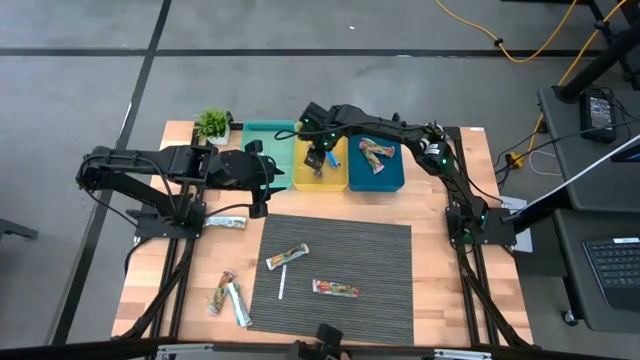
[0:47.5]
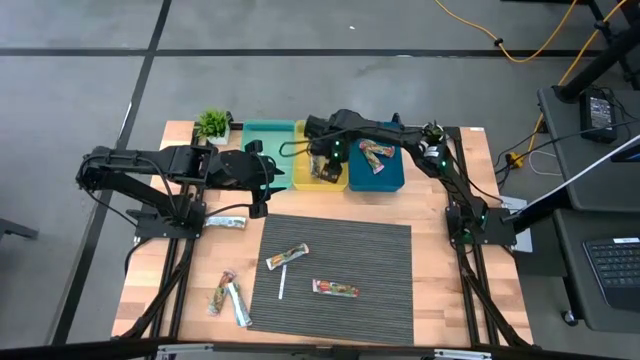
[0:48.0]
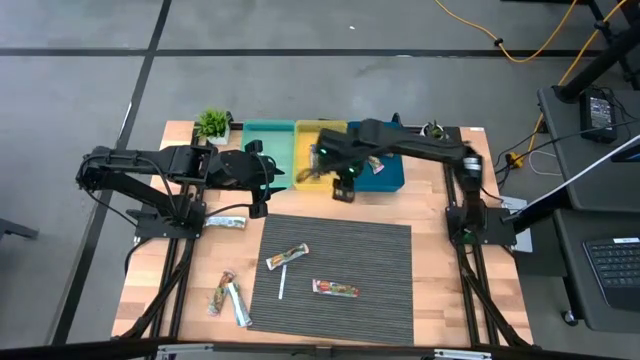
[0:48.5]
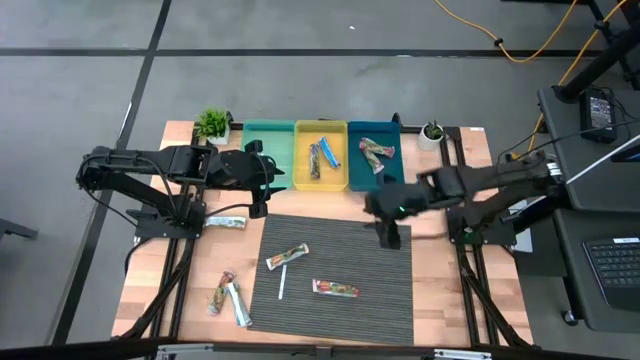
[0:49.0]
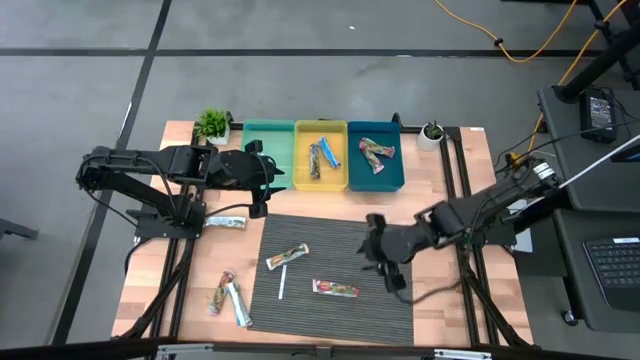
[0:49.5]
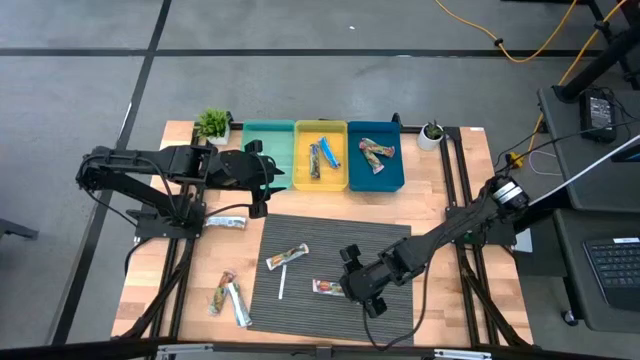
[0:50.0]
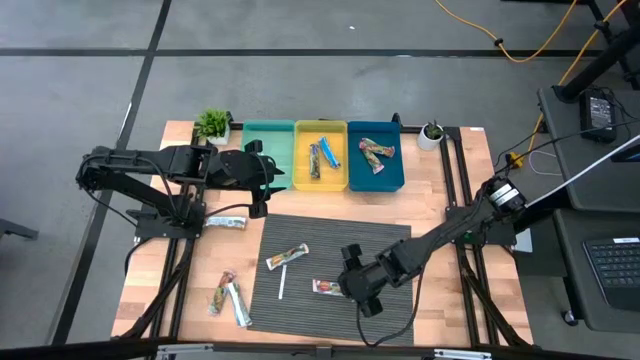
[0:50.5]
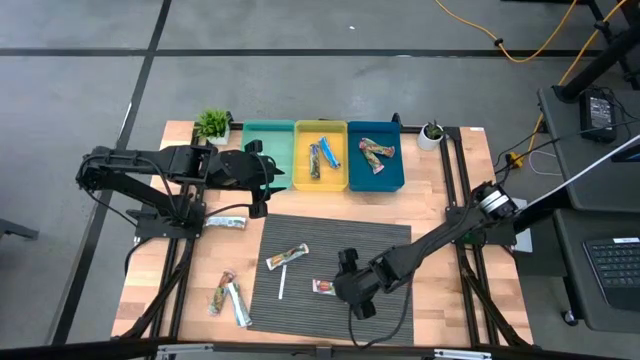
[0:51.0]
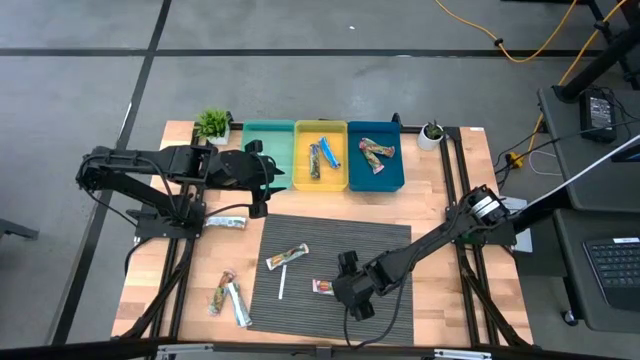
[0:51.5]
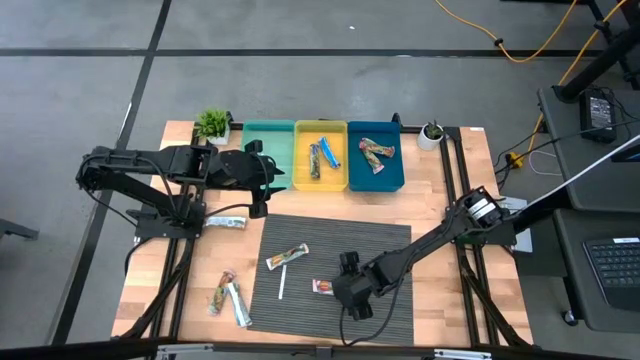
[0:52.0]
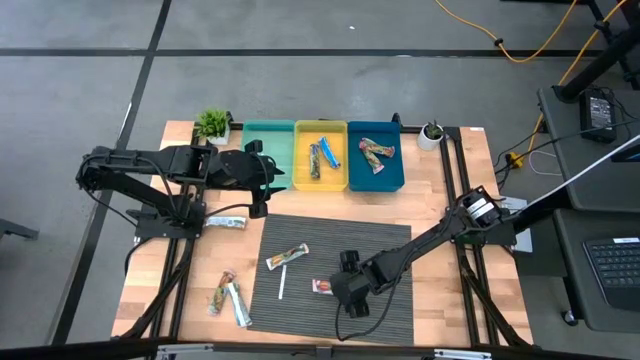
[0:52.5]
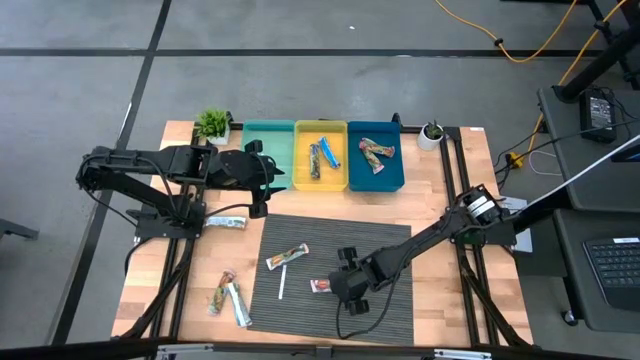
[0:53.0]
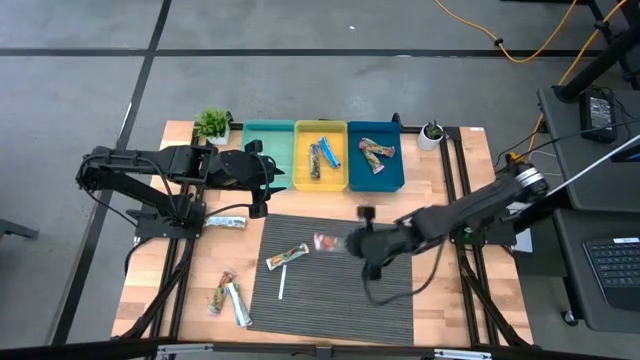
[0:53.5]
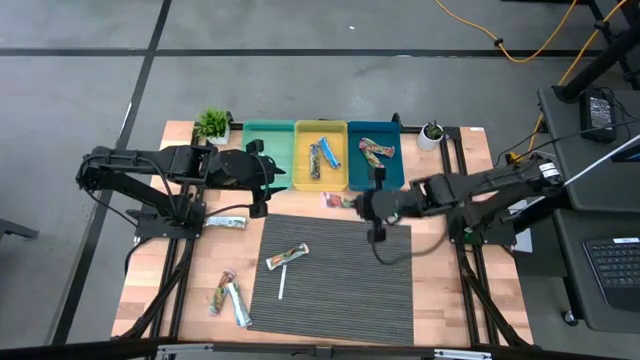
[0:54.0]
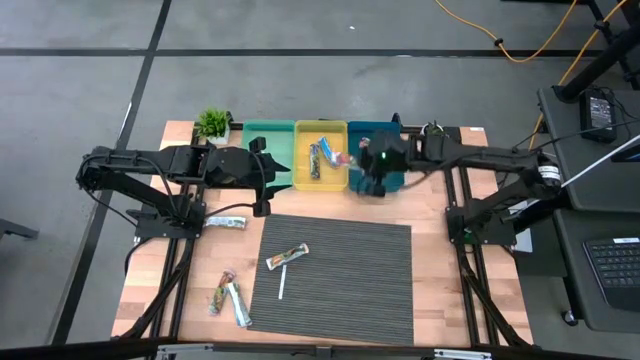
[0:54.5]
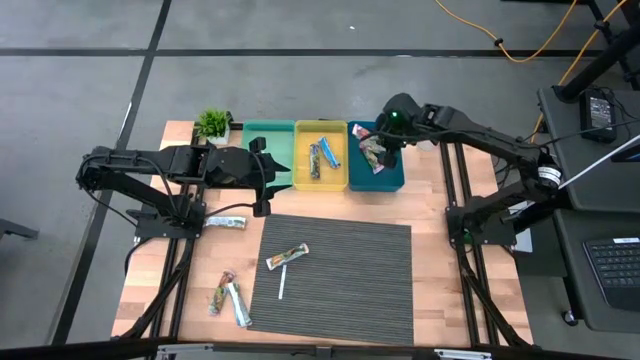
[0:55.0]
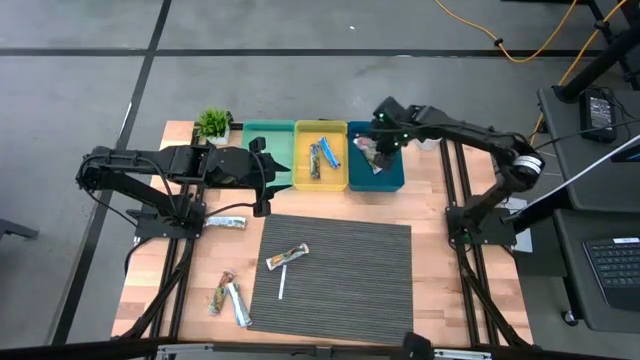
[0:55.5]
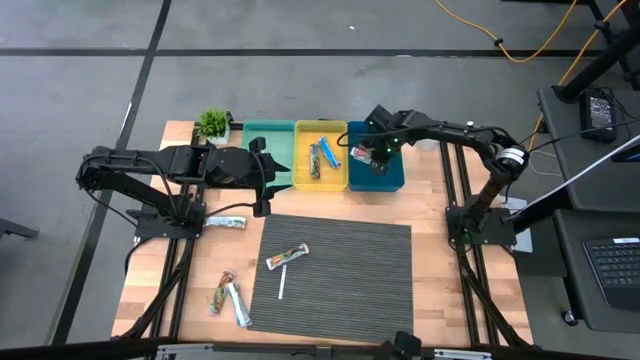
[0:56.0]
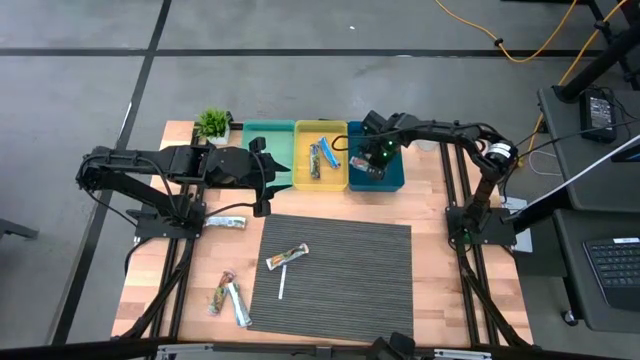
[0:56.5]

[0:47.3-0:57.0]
Task: Pick and place Granola Bars by type
Put the red granola bar into the blue bin

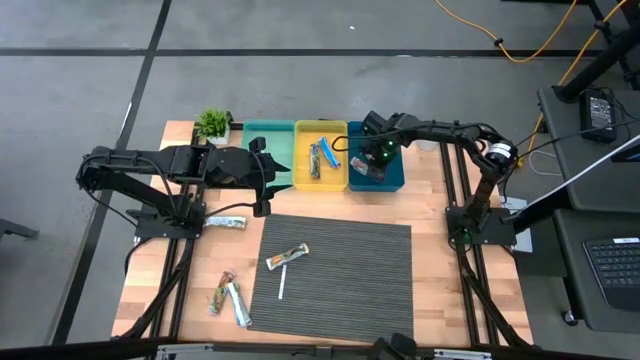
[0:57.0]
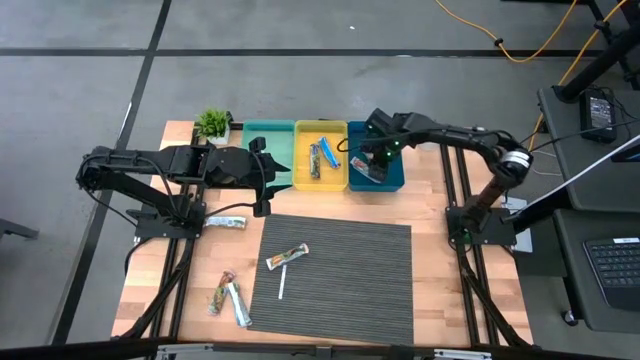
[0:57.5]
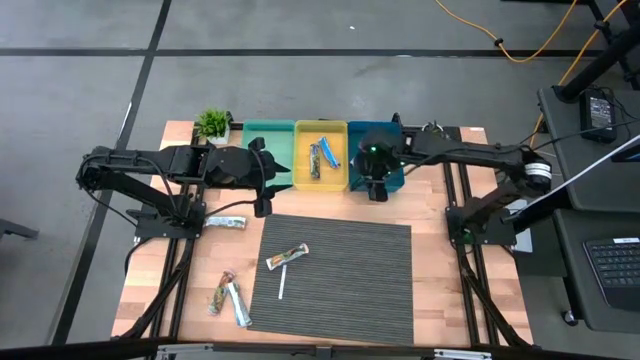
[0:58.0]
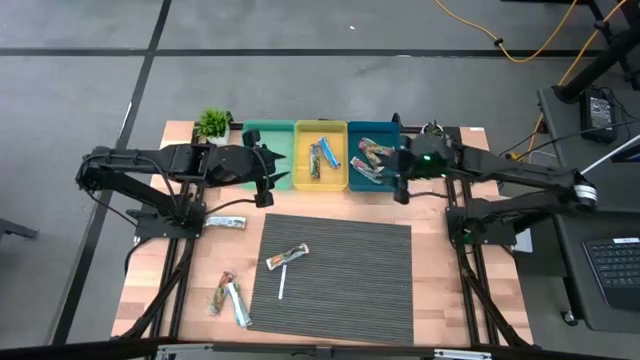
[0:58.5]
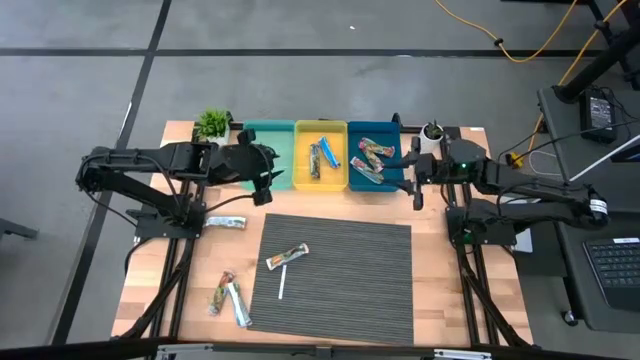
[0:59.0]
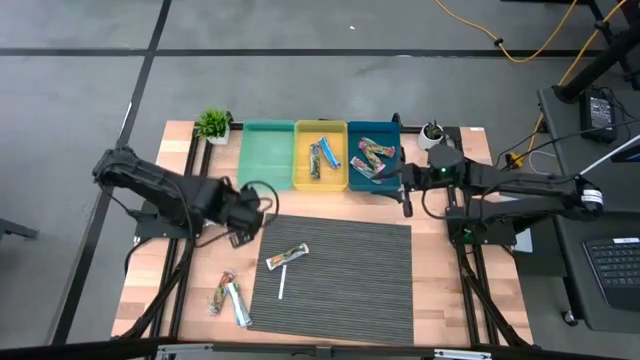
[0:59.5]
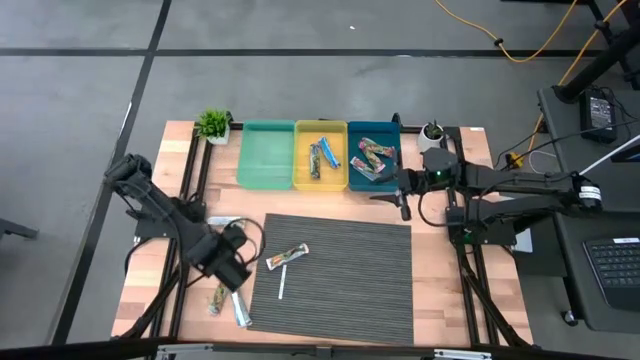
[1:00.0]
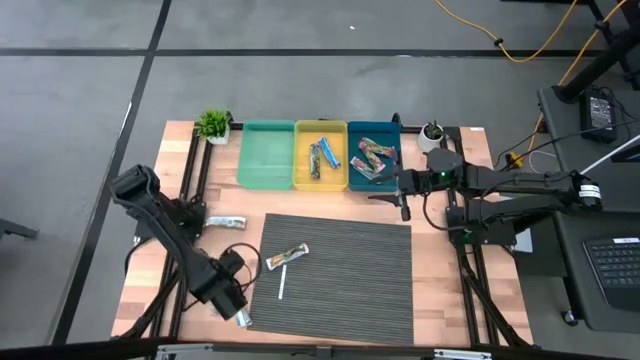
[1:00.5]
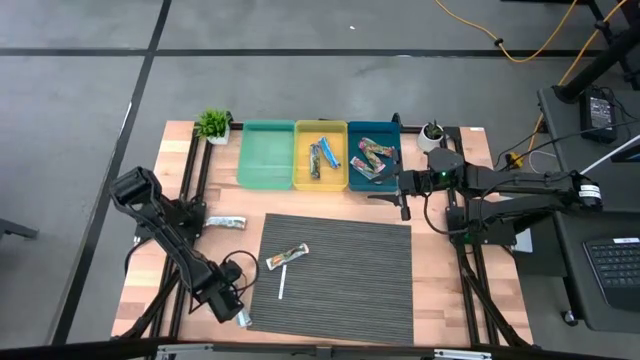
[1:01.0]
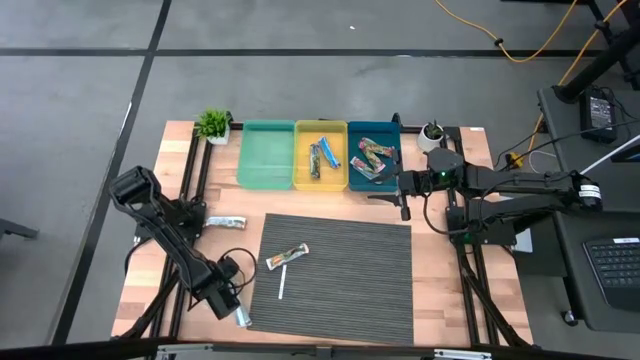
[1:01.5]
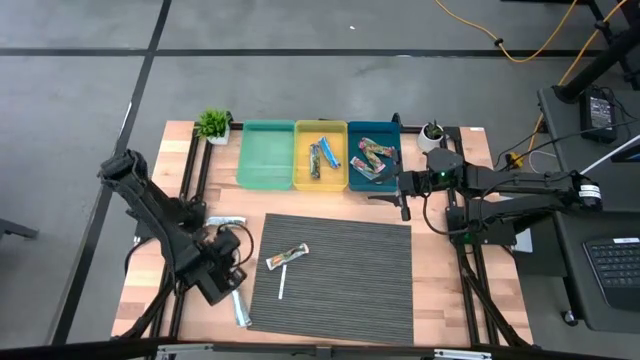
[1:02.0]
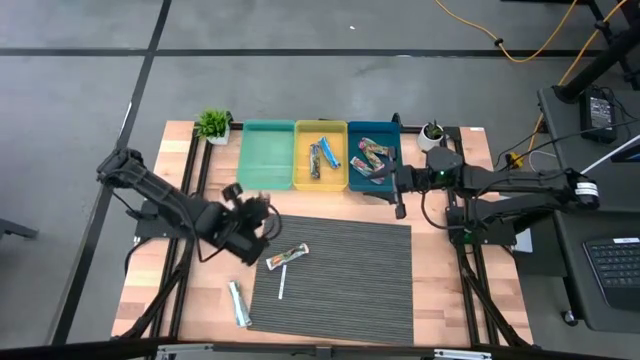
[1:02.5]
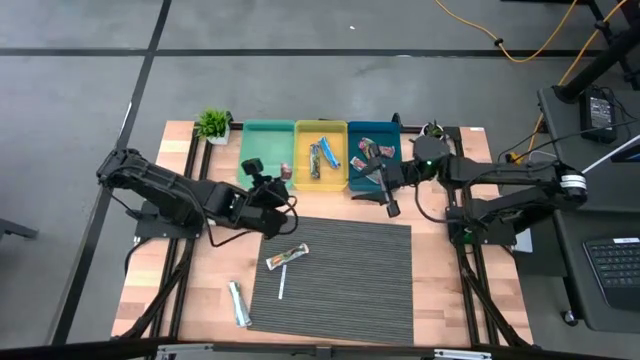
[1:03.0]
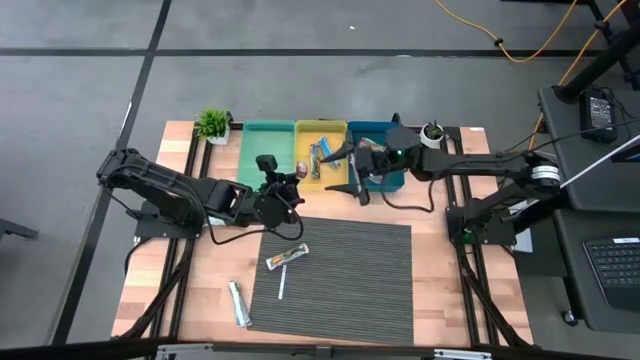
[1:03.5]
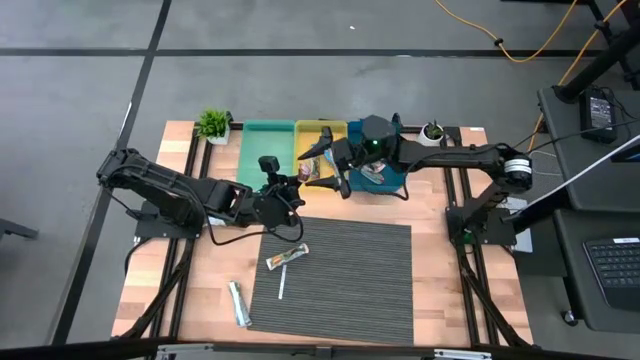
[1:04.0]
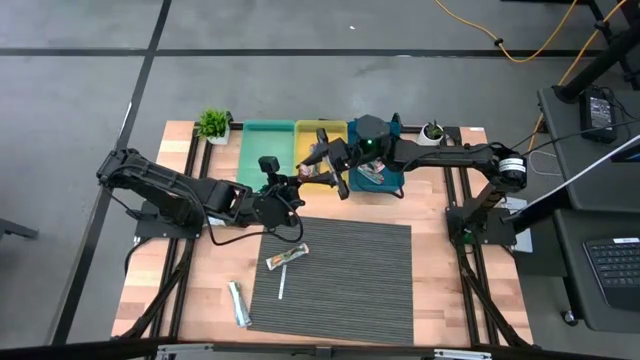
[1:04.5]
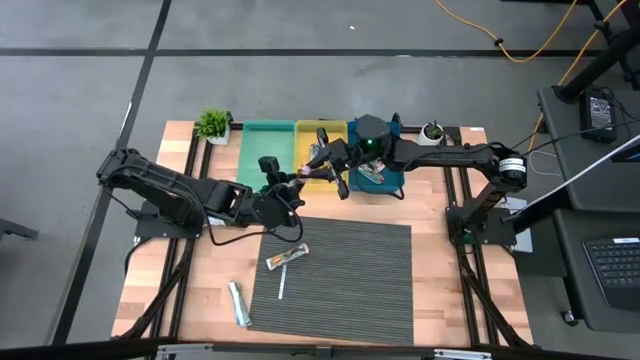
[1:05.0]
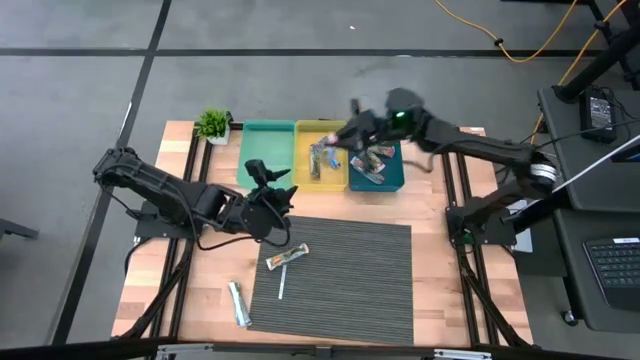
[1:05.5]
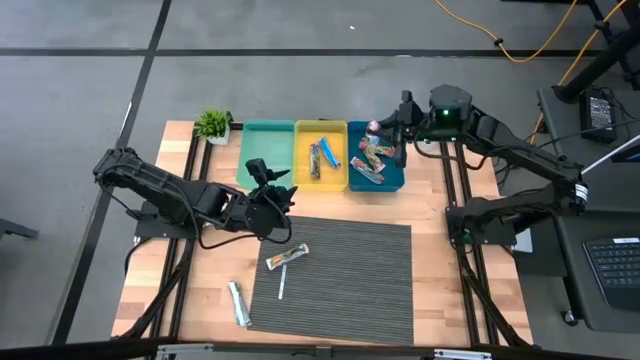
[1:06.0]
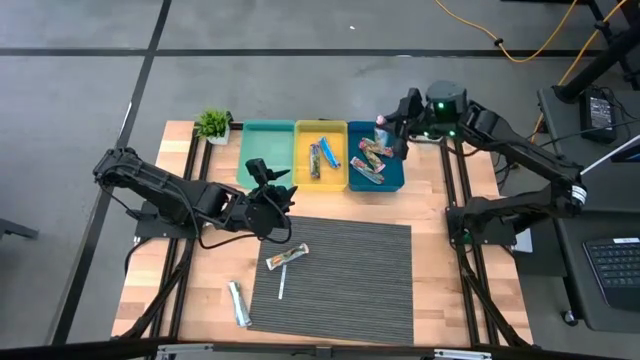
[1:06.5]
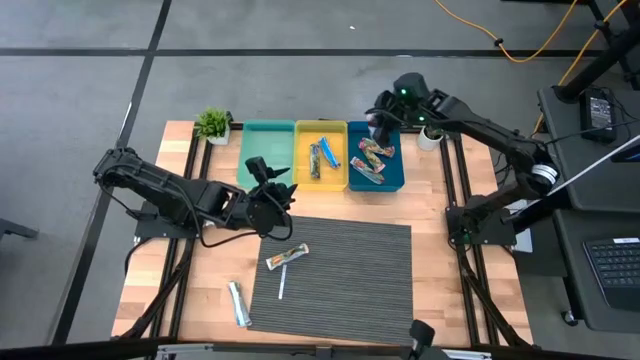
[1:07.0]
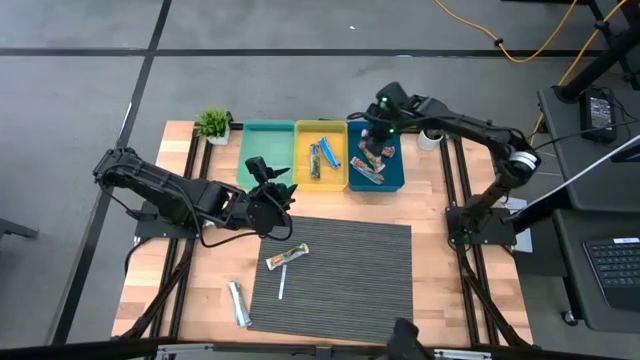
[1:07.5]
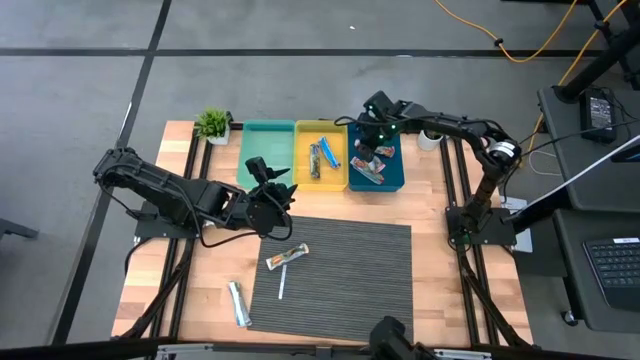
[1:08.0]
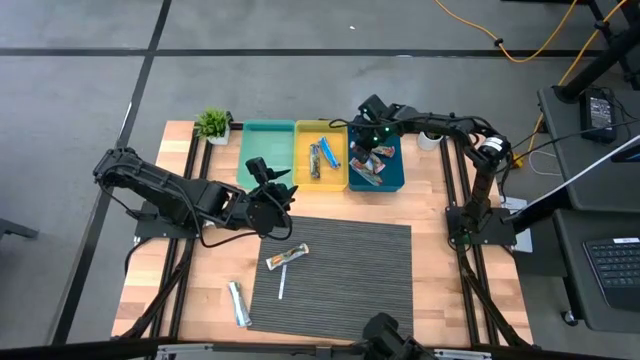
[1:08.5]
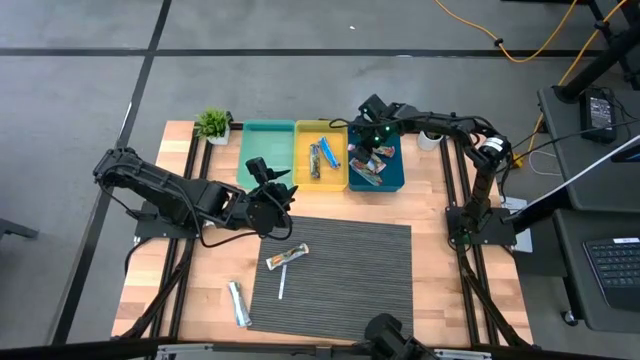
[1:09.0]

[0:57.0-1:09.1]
Put the red granola bar into the blue bin

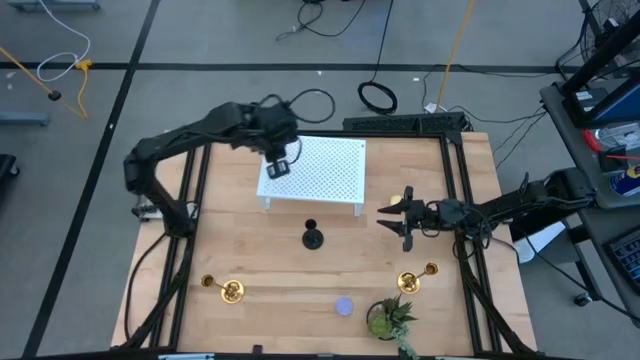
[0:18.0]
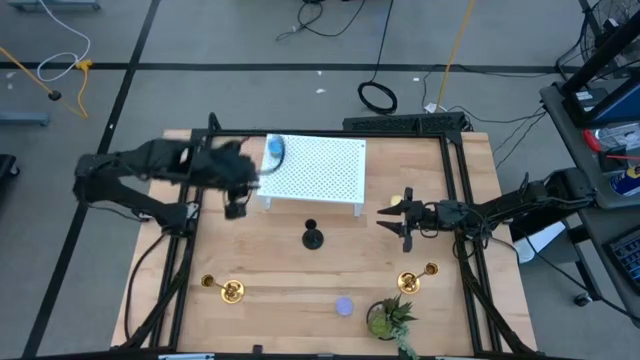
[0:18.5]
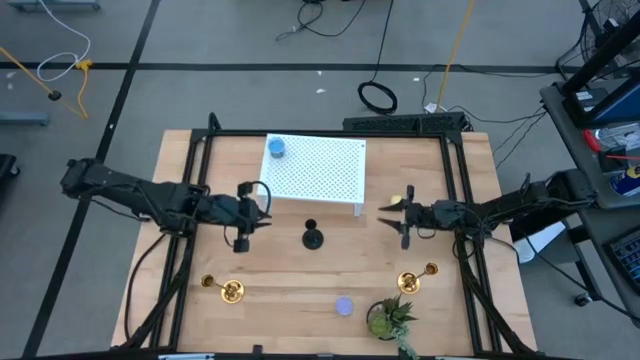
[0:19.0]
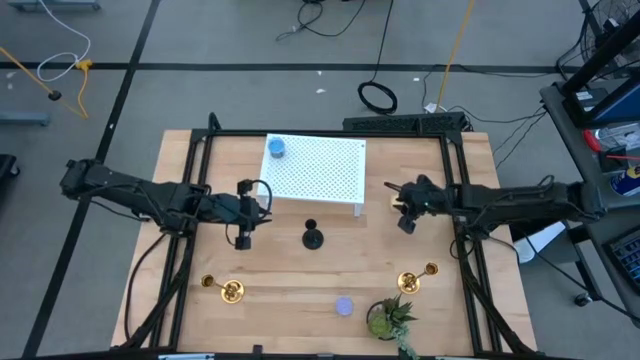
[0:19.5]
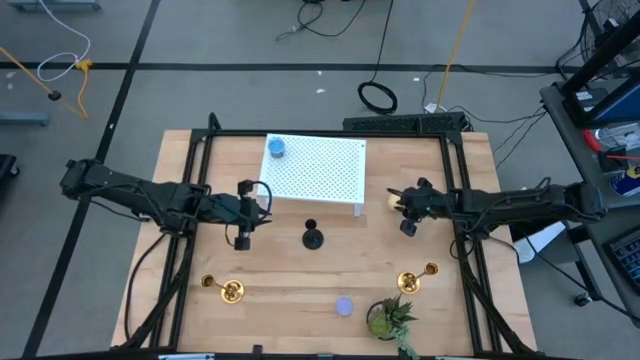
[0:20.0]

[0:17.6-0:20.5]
Task: Pick & Place candle stick holders
Put the yellow scented candle on the shelf
